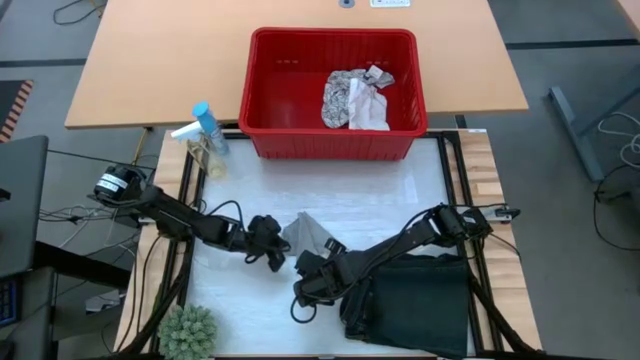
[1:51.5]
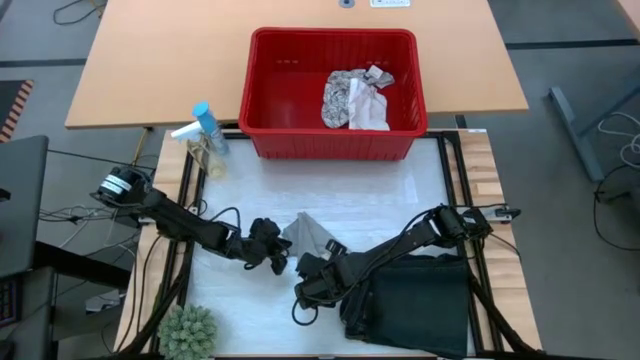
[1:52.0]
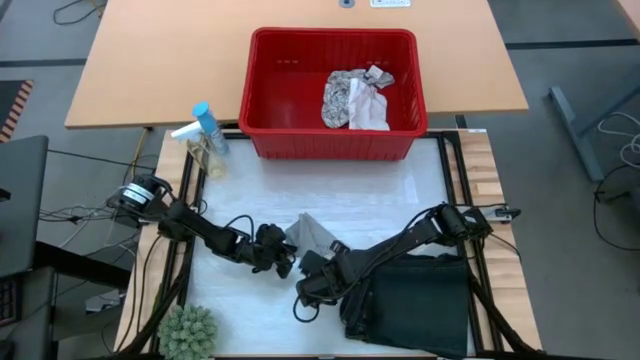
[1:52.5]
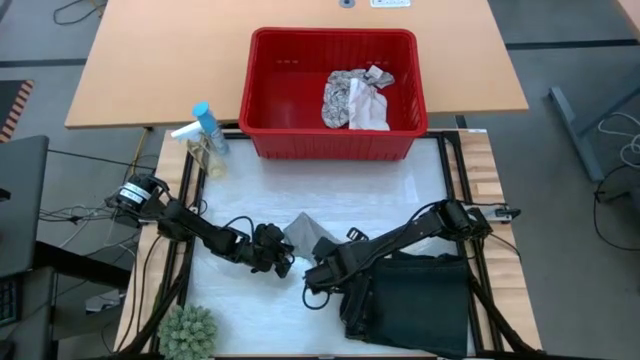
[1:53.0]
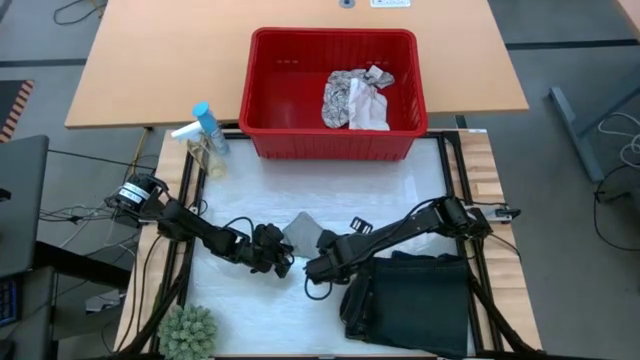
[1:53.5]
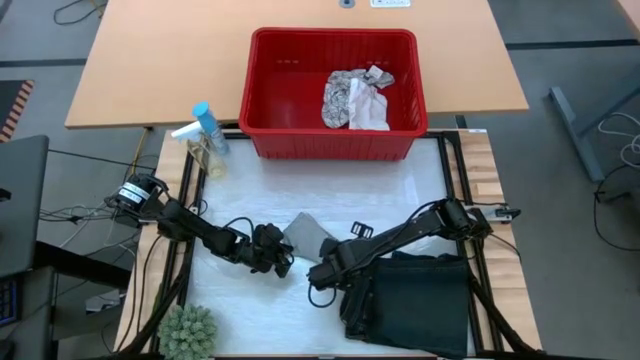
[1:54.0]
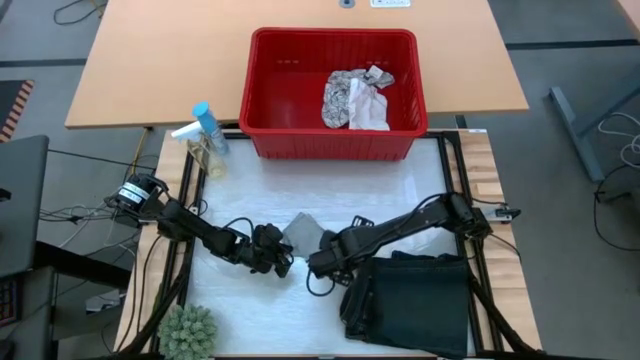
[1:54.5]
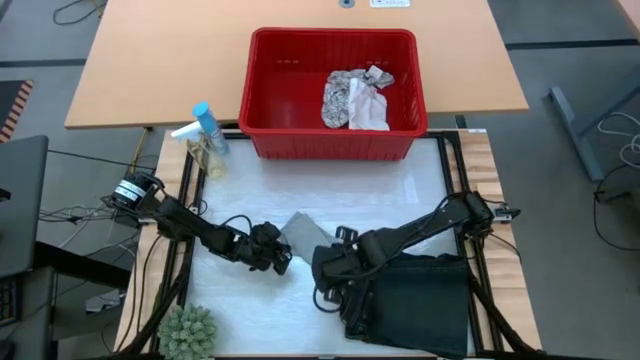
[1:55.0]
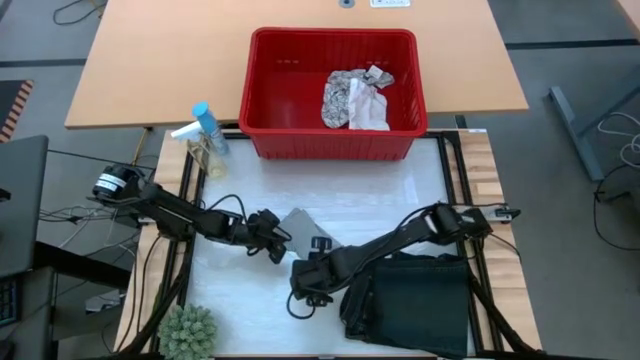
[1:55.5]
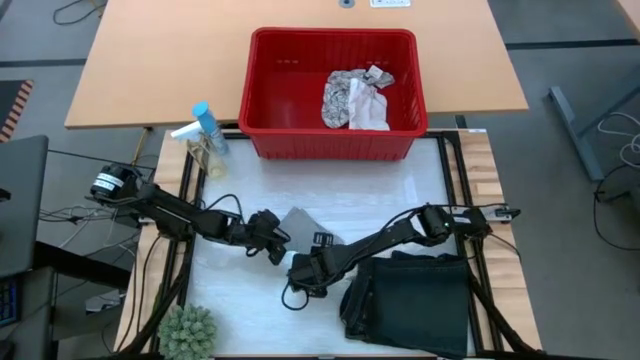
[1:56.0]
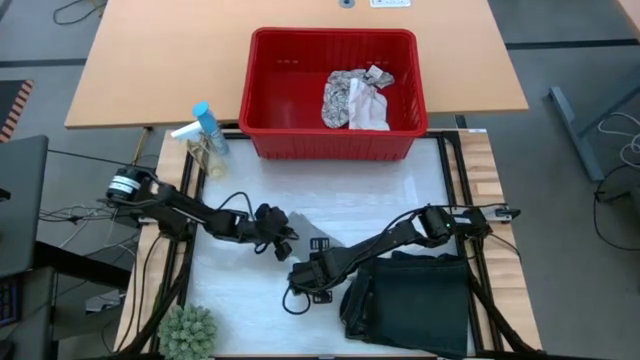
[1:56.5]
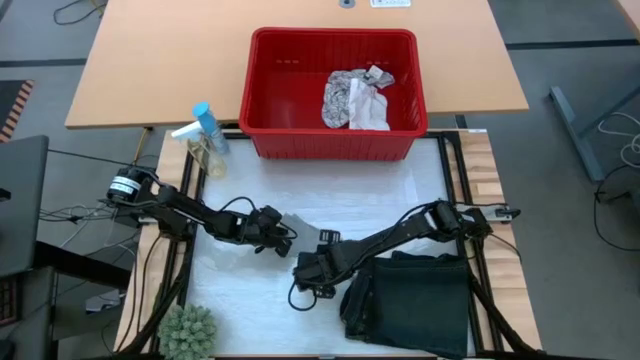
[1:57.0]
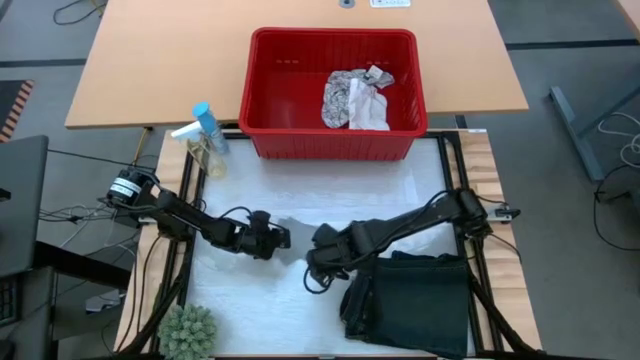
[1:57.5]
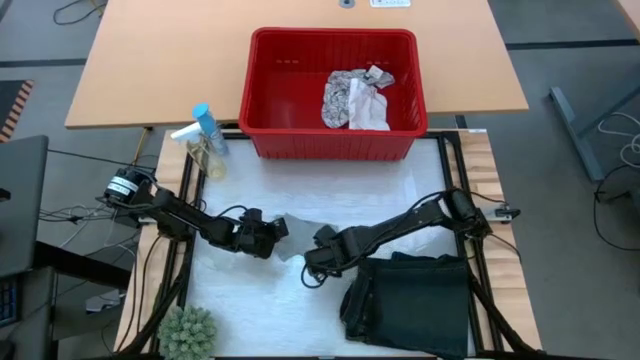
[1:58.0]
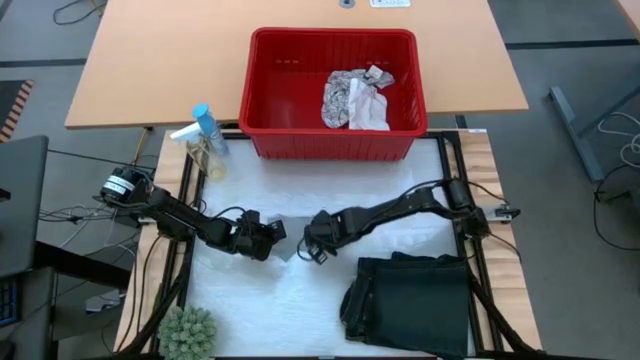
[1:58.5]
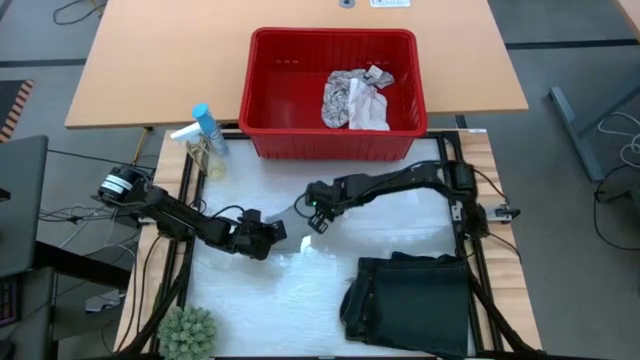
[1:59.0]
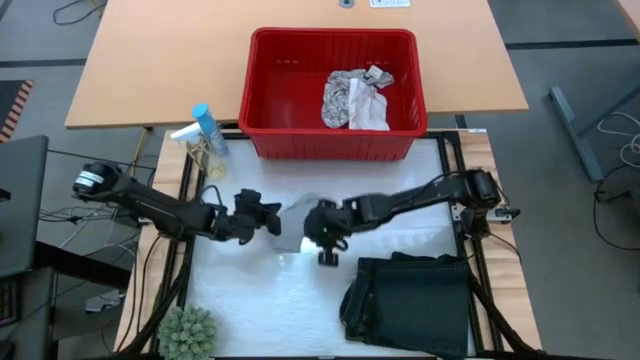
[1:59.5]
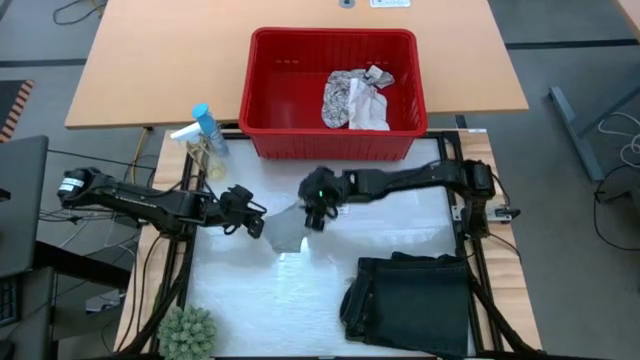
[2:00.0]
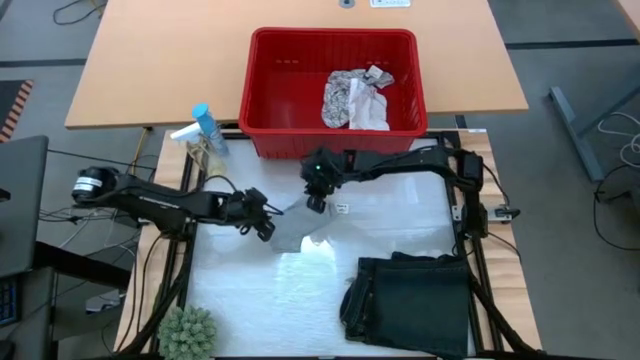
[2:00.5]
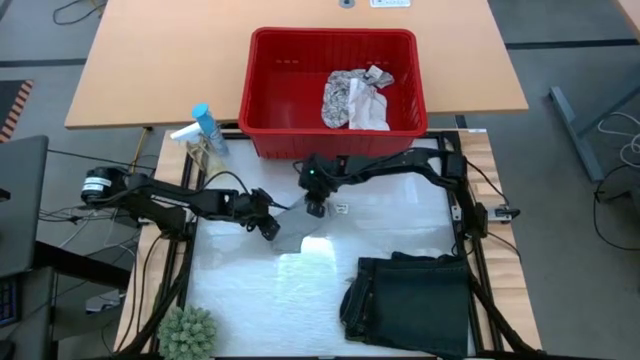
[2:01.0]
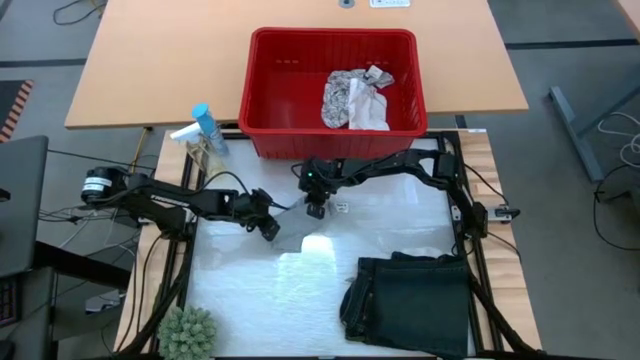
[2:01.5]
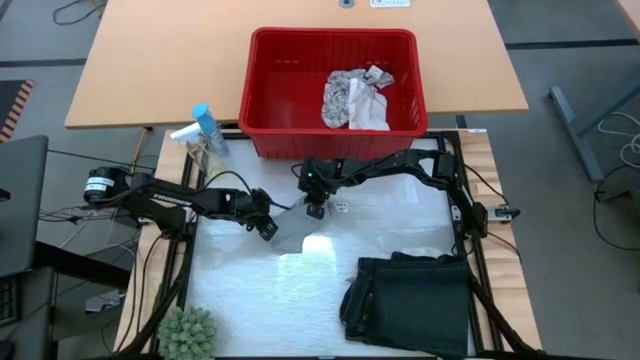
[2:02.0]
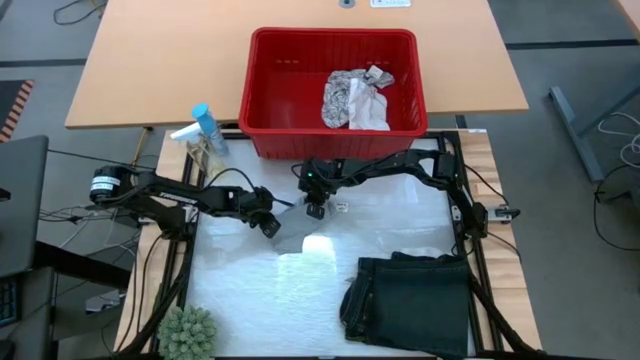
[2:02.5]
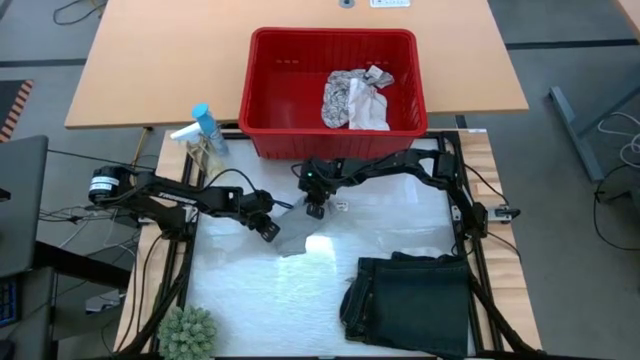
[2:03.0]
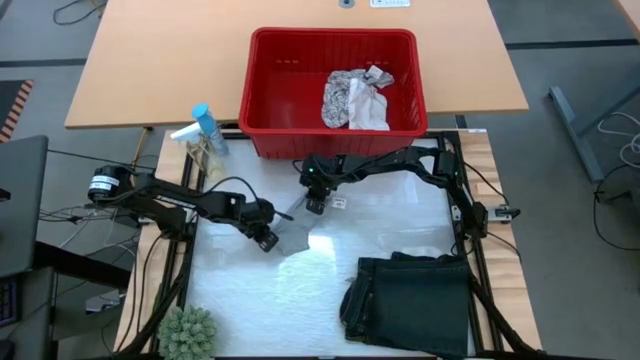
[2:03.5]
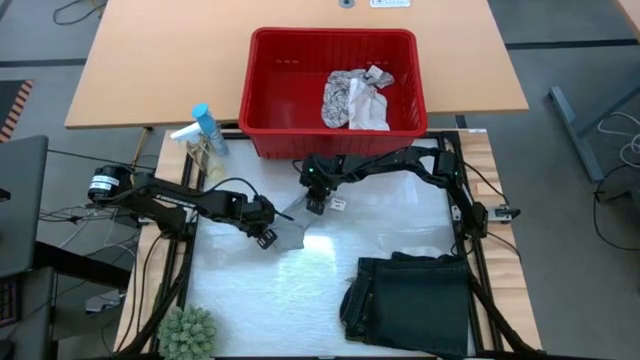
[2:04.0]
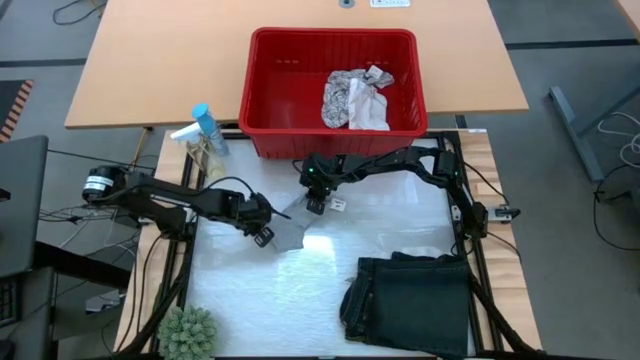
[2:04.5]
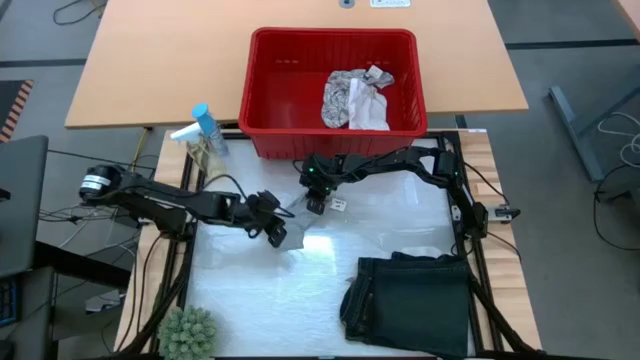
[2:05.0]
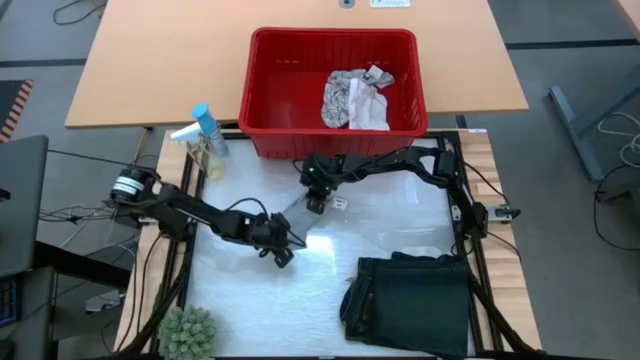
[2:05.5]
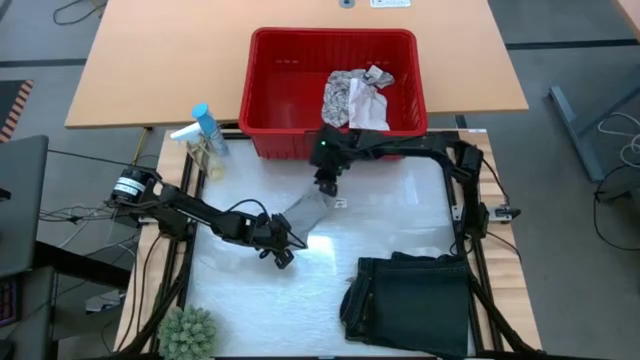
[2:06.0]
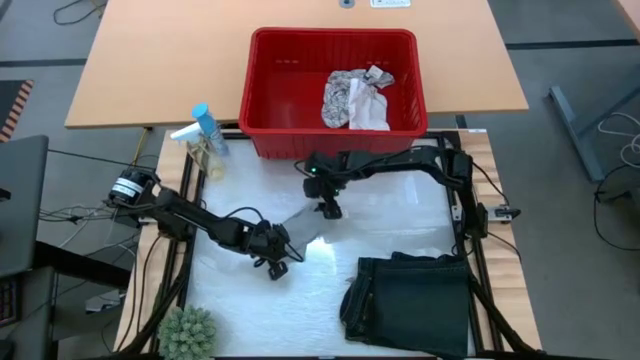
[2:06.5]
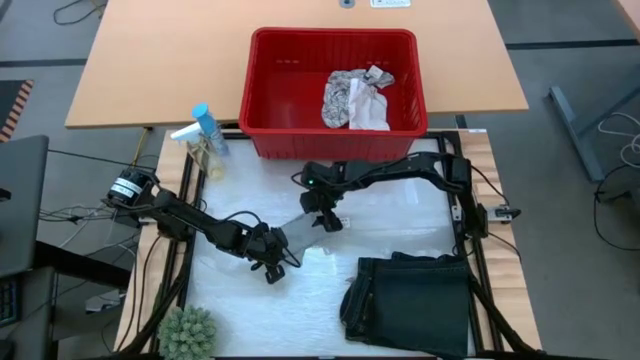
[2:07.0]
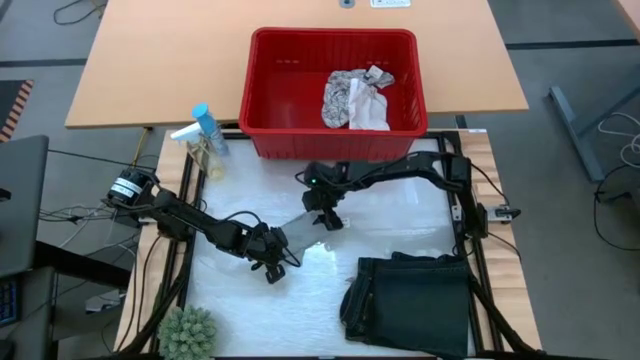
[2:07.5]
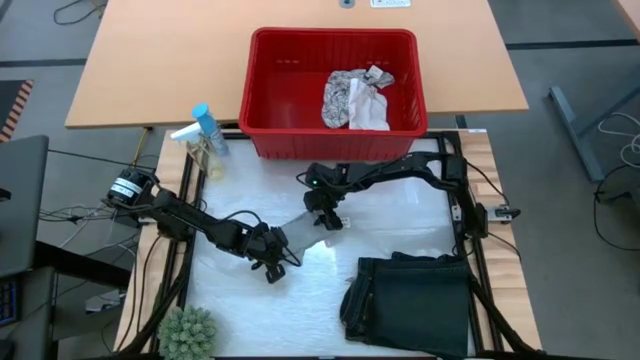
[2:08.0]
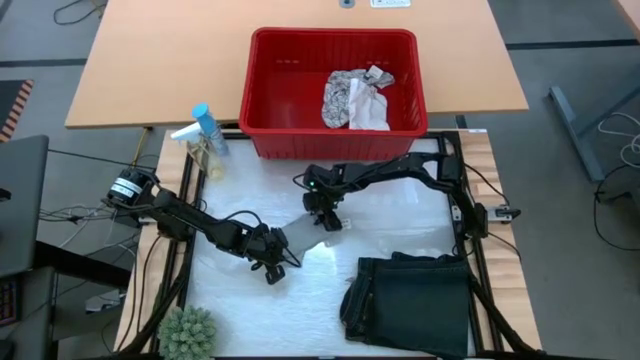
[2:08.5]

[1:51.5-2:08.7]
Task: Fold Laundry from Bin
Fold the gray boxer from the red laundry bin

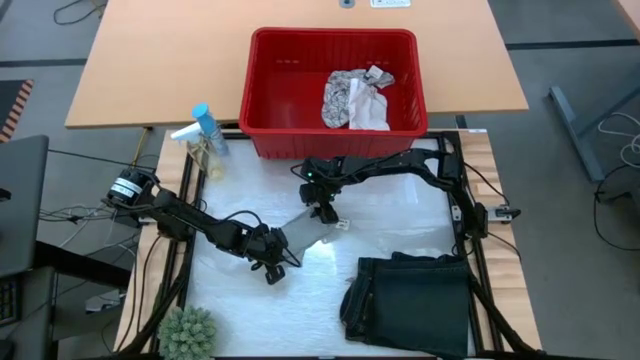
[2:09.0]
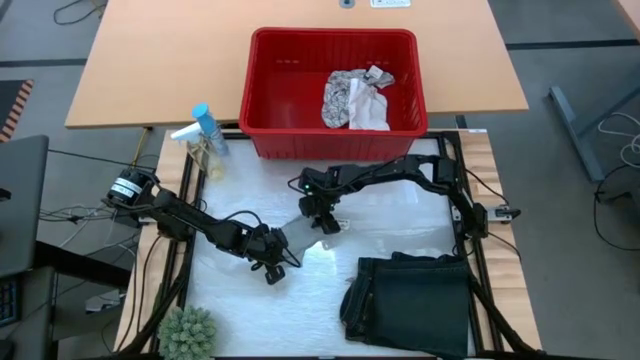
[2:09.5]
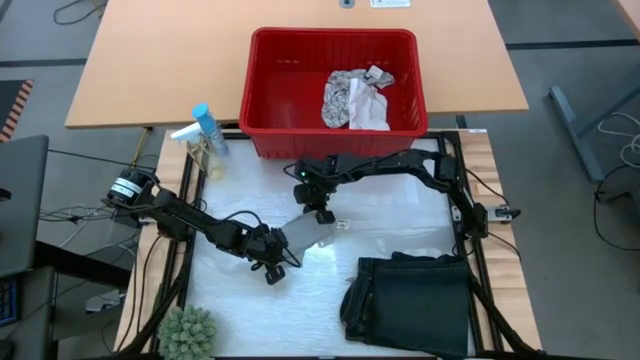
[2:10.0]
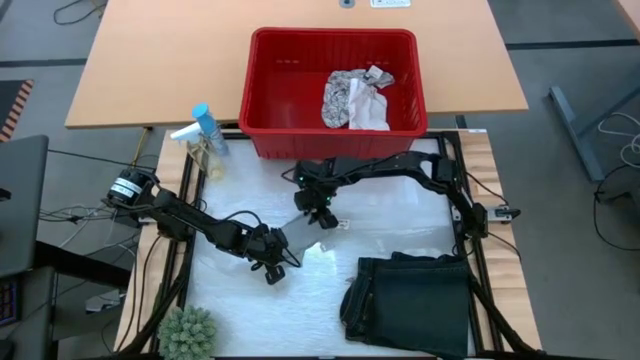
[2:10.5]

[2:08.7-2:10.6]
Fold the gray boxer from the red laundry bin

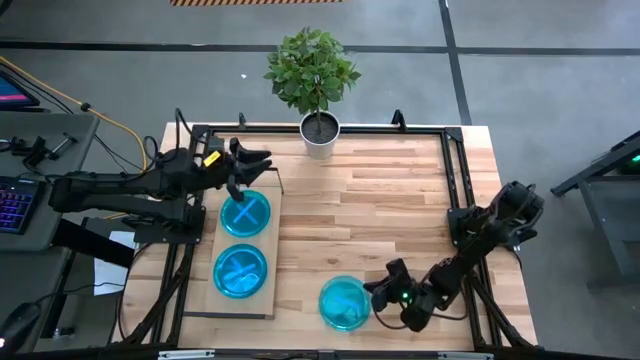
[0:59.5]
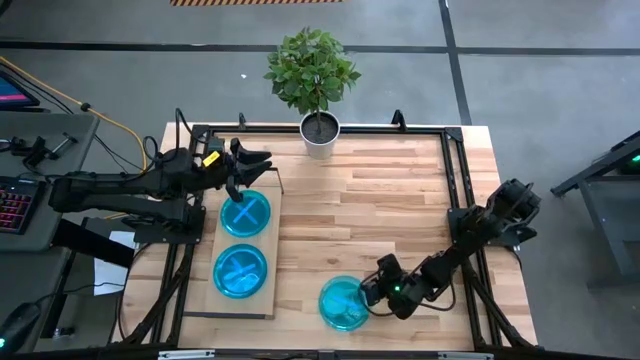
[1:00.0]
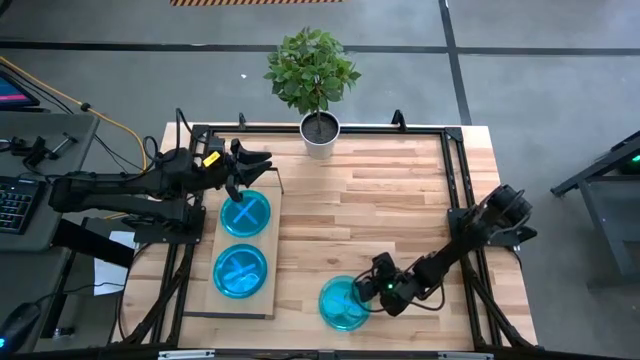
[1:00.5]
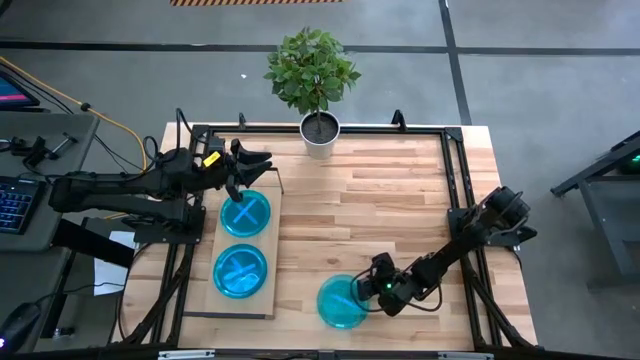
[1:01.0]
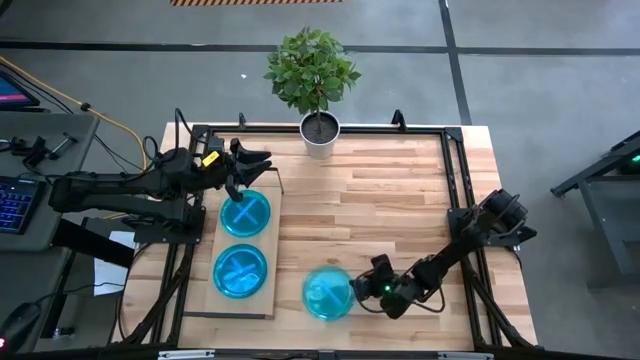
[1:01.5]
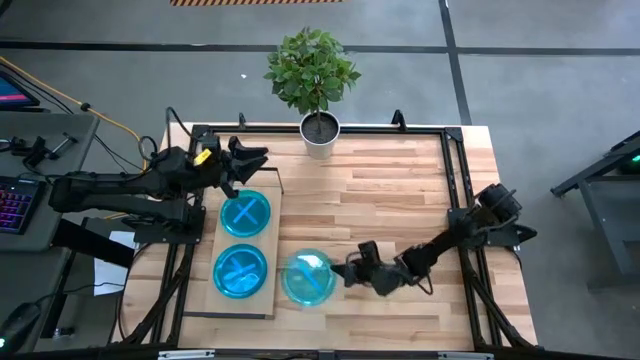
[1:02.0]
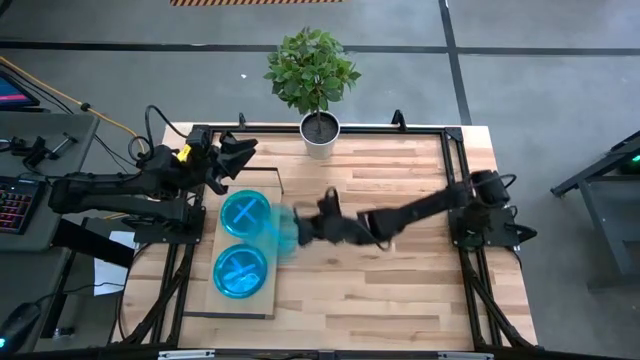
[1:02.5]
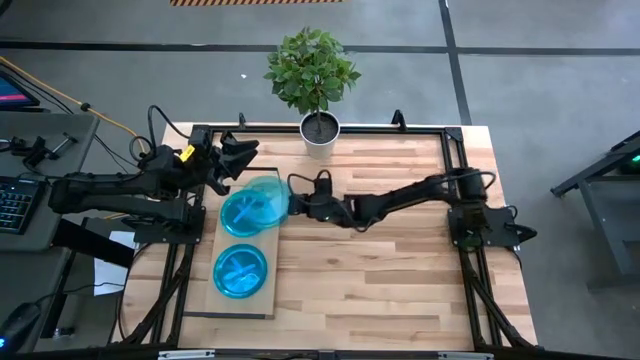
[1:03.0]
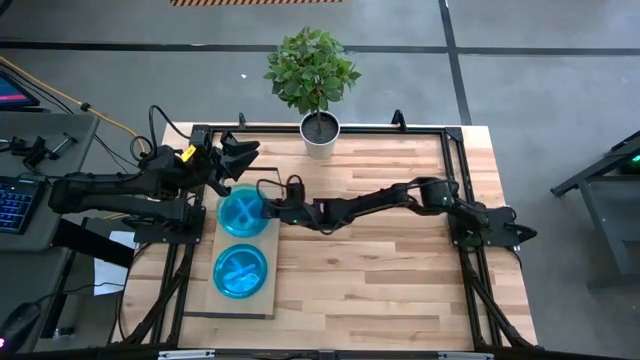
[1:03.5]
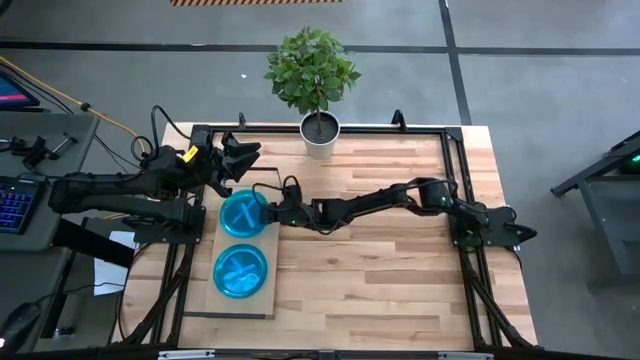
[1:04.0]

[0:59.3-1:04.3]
Task: Place and stack plates onto a shelf
Stack the blue plate on the top blue plate on the shelf
